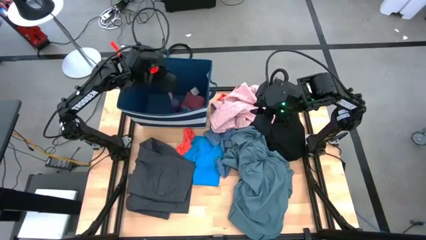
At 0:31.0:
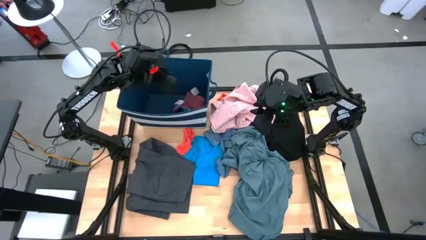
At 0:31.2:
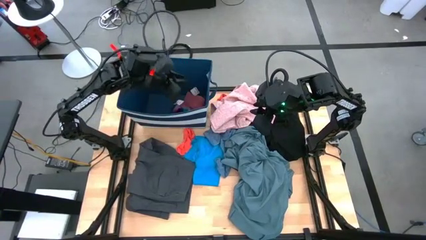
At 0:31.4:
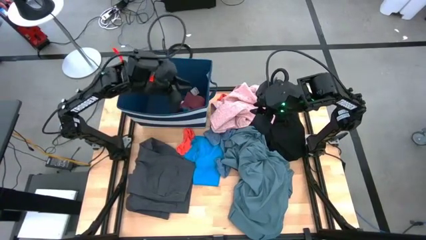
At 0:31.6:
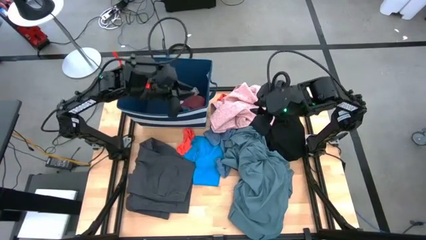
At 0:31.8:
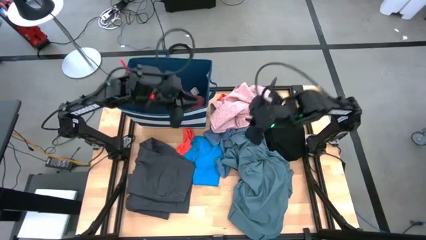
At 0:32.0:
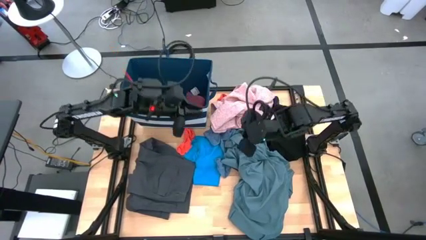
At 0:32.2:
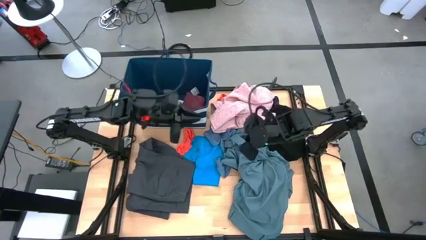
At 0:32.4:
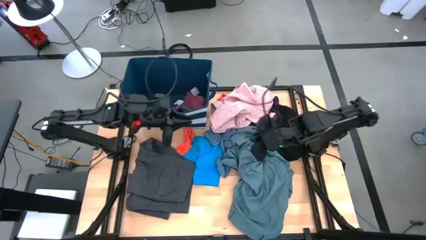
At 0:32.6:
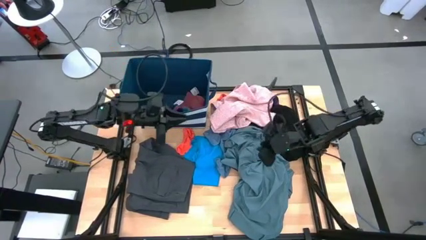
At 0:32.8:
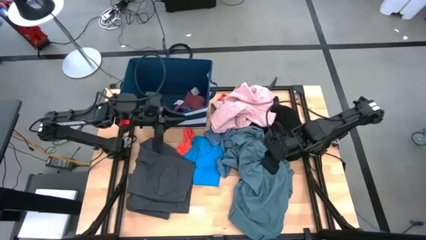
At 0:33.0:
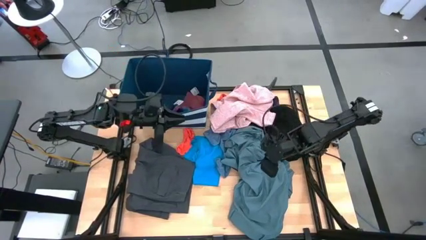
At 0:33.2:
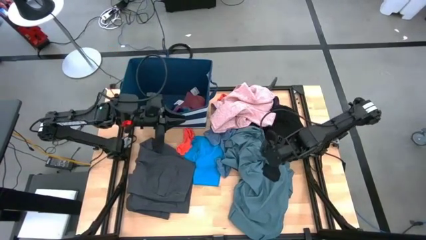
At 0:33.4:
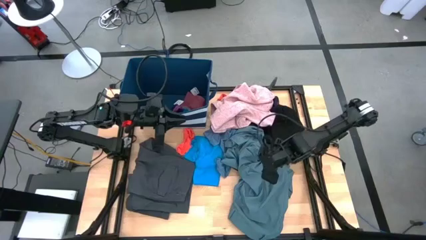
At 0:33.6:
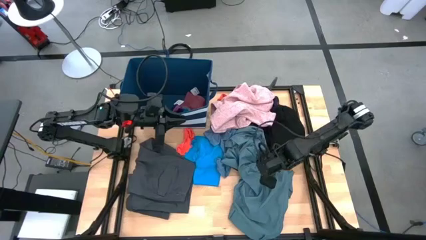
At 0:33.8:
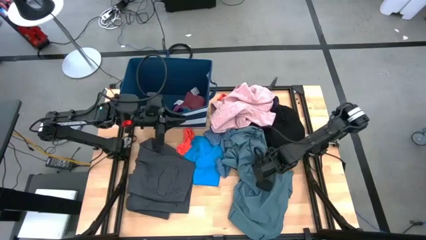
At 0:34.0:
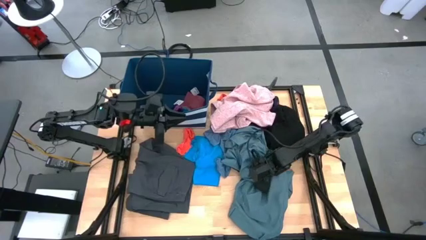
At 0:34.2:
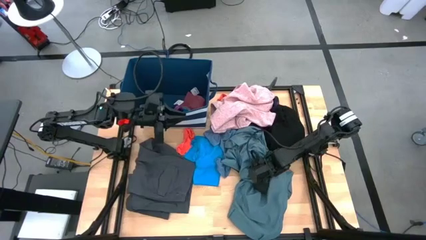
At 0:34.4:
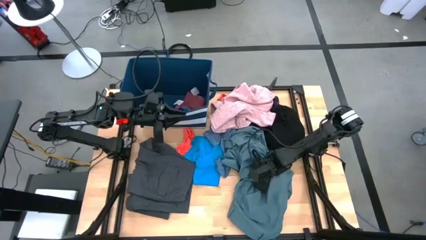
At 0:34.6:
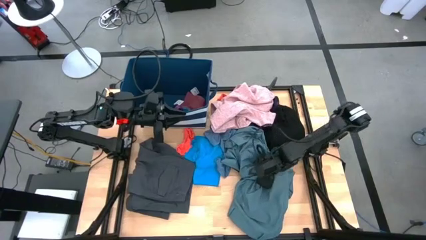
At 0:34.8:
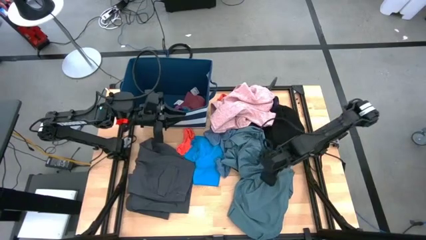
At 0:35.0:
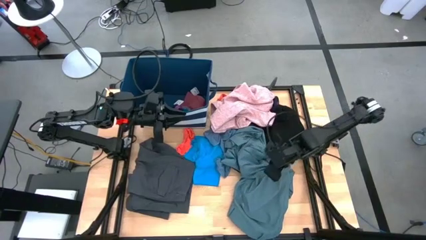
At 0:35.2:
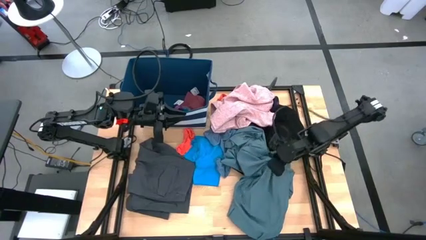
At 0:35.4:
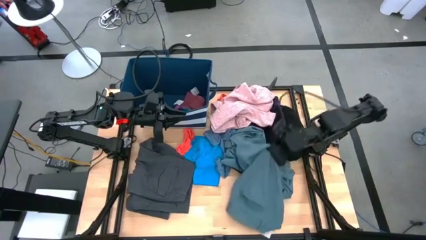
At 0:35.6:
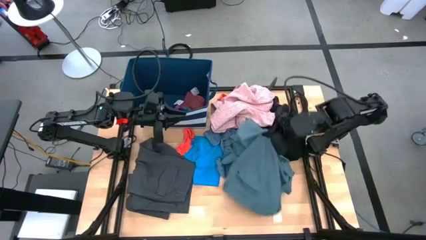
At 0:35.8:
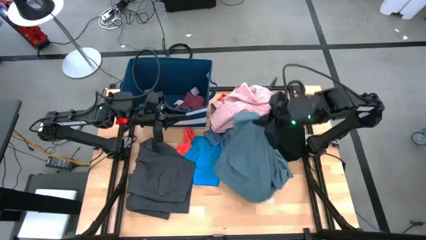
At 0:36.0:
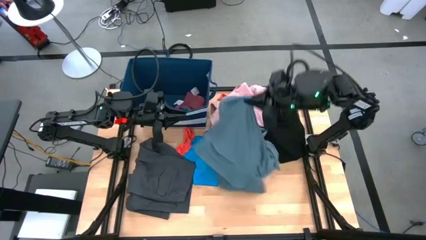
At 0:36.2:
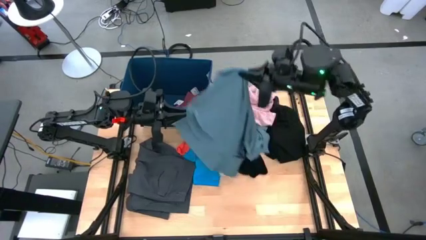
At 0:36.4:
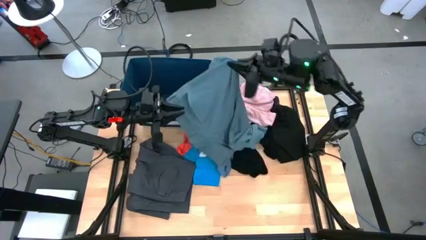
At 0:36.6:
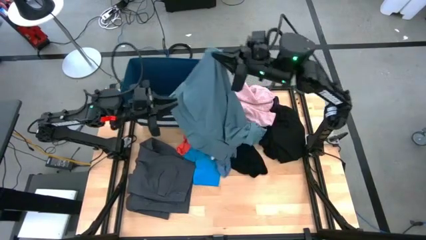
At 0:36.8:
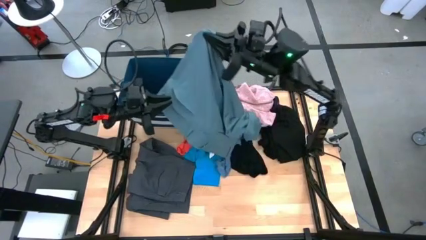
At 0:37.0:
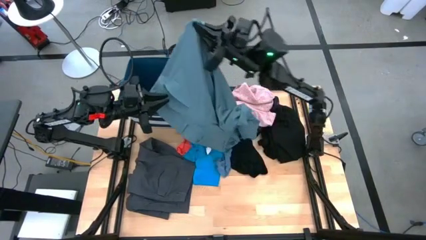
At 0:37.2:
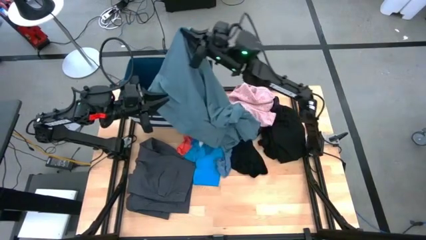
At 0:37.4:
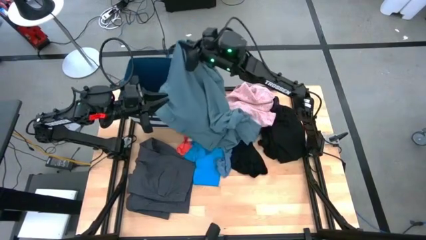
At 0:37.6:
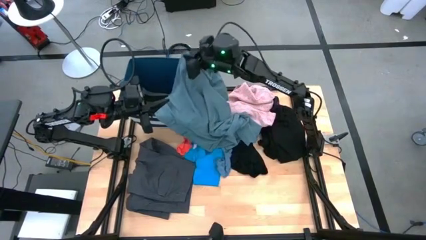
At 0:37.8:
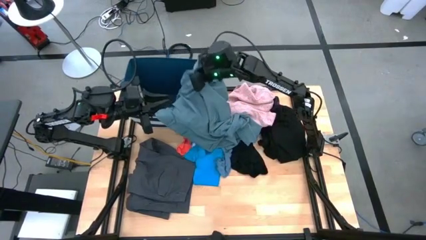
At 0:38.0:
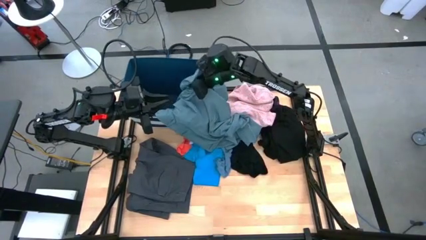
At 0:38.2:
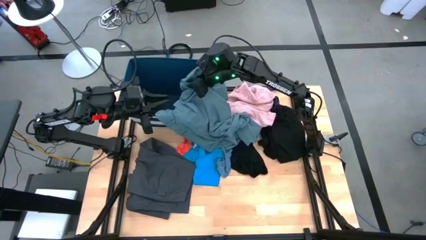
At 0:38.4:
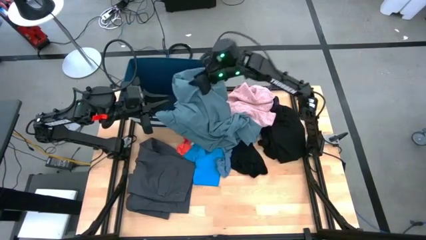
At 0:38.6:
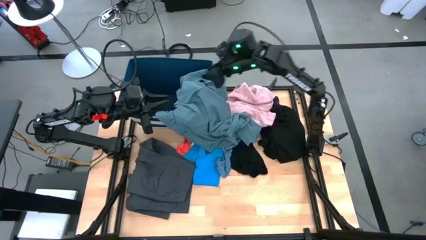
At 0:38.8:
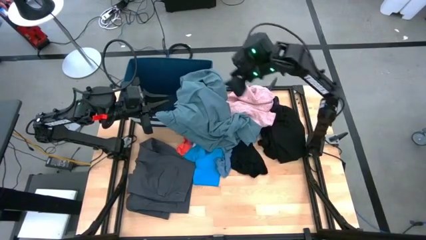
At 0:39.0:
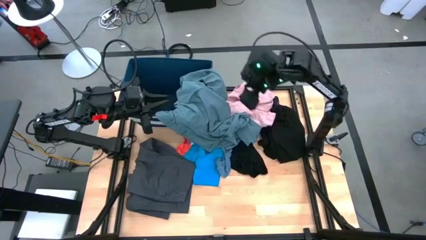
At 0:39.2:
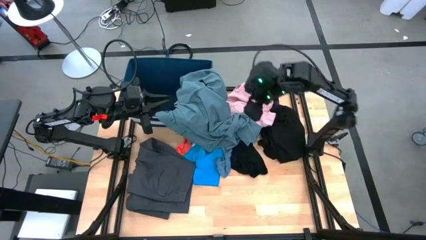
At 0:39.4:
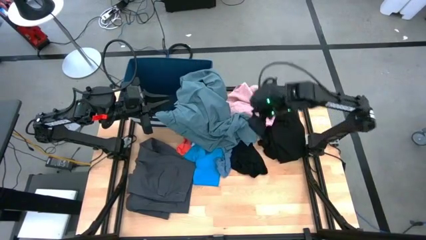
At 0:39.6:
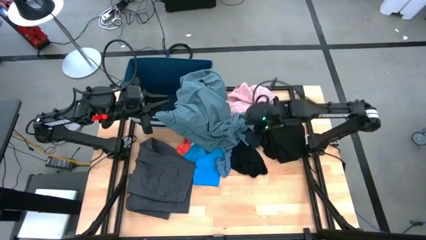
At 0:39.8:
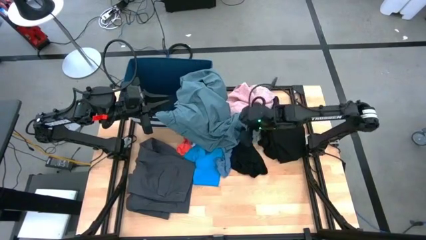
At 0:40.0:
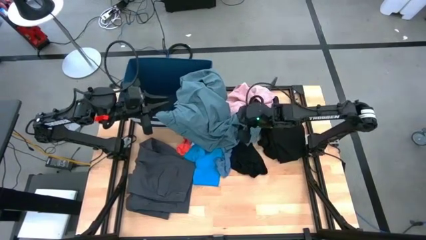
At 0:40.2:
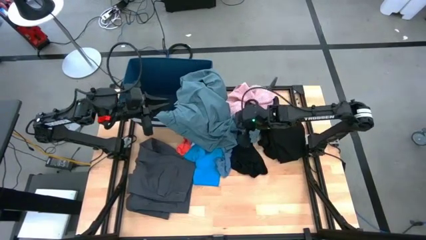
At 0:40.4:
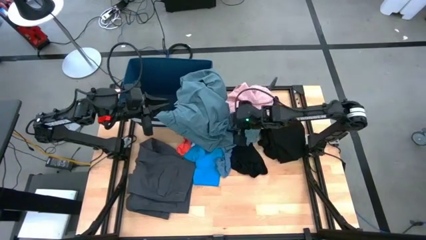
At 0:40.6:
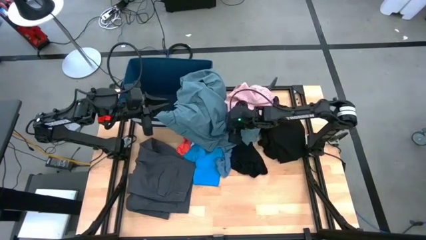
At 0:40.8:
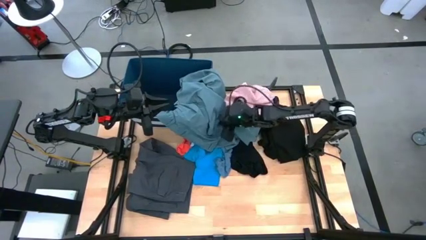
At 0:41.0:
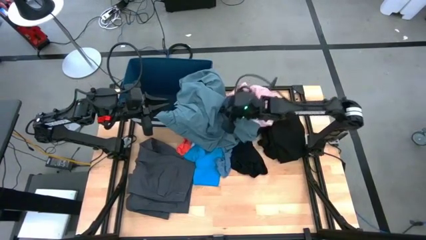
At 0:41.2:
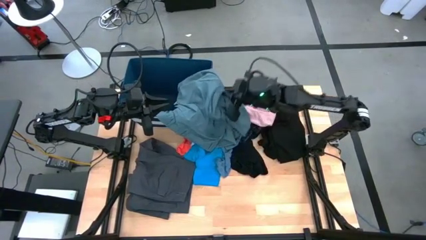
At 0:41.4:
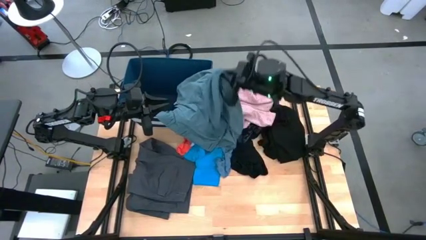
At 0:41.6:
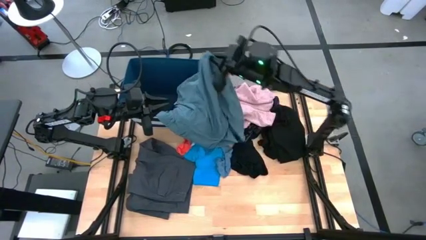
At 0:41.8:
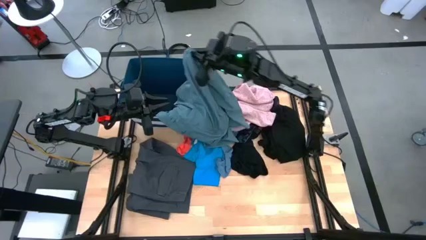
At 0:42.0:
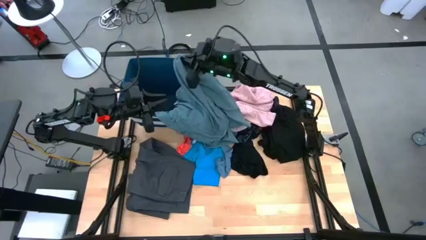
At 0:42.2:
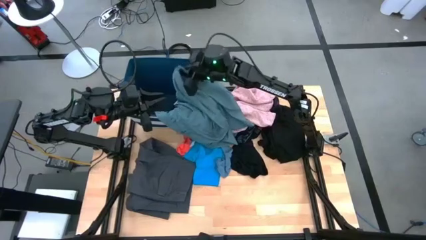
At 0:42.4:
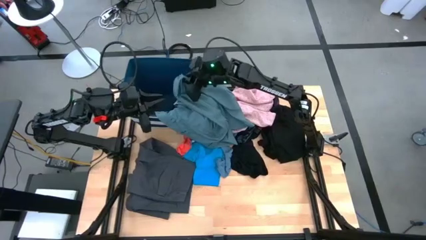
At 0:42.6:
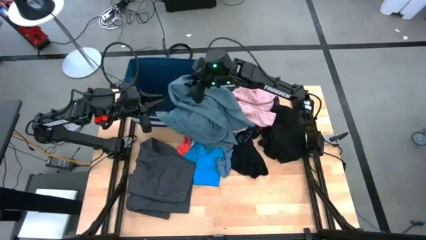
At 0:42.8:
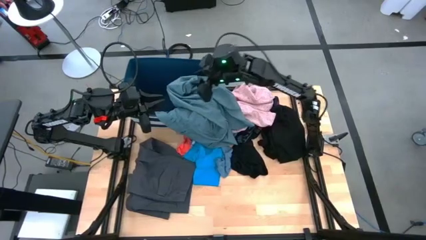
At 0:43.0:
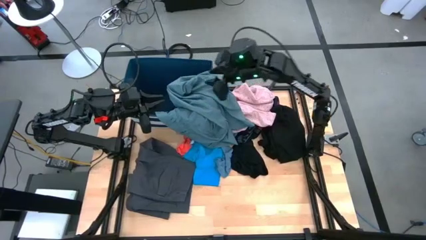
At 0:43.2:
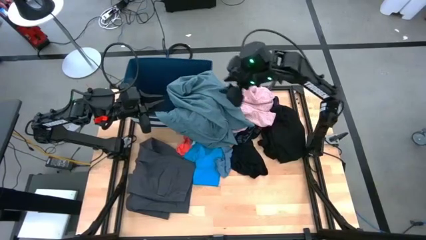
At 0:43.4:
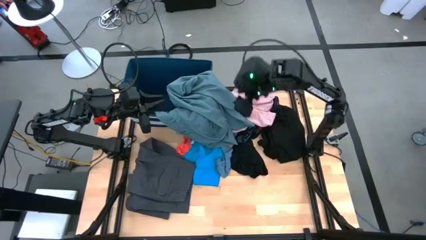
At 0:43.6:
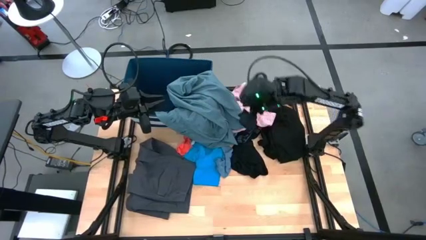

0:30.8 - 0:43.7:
Task: Sort clothes
Put the blue pants into the blue laundry bin
